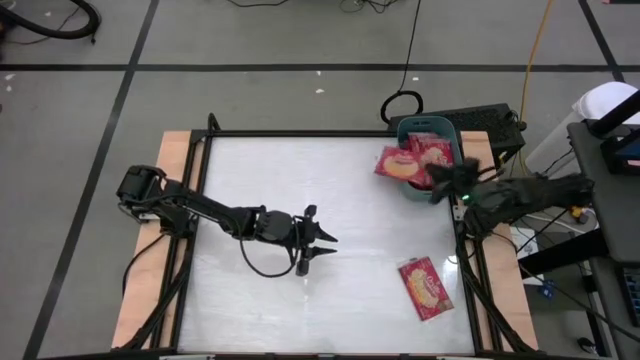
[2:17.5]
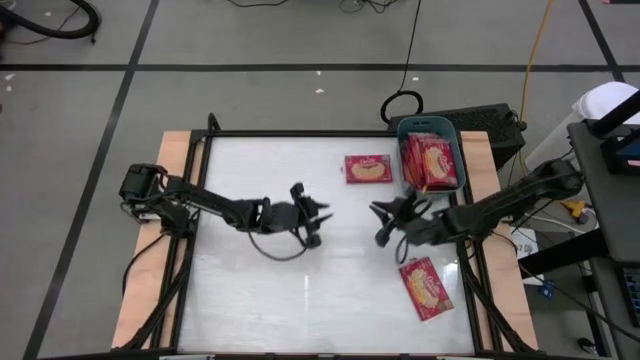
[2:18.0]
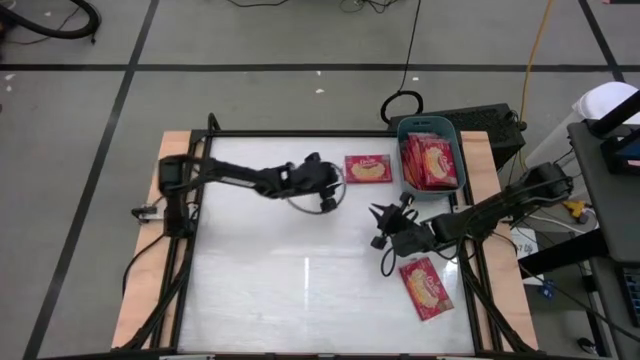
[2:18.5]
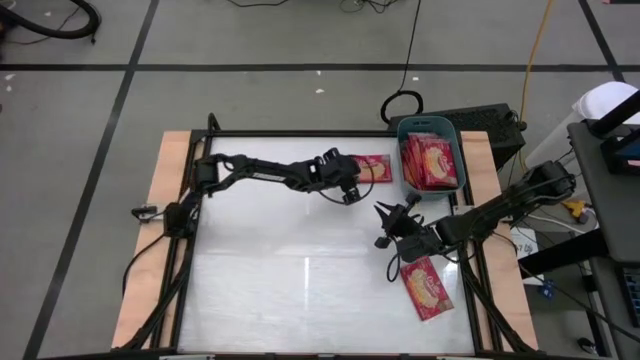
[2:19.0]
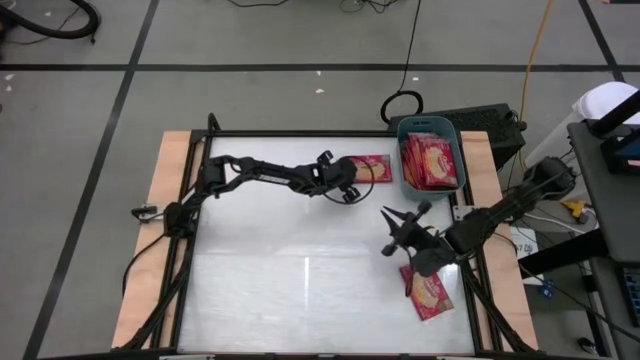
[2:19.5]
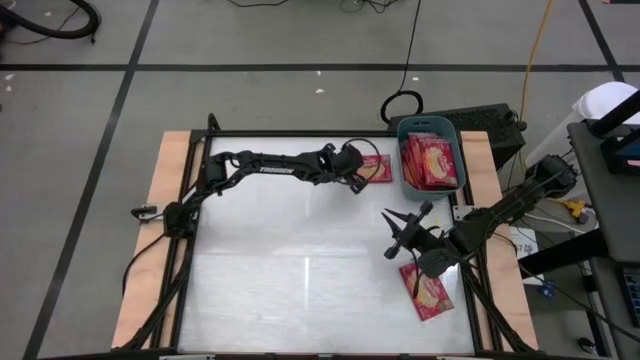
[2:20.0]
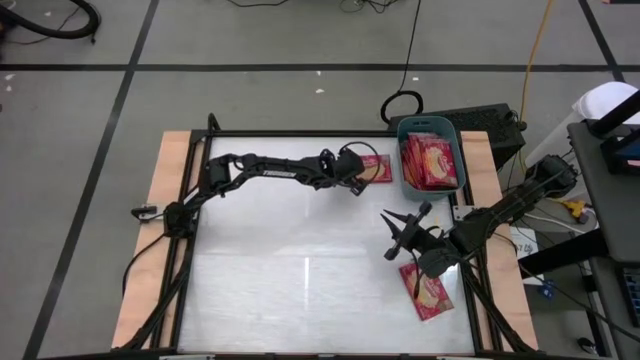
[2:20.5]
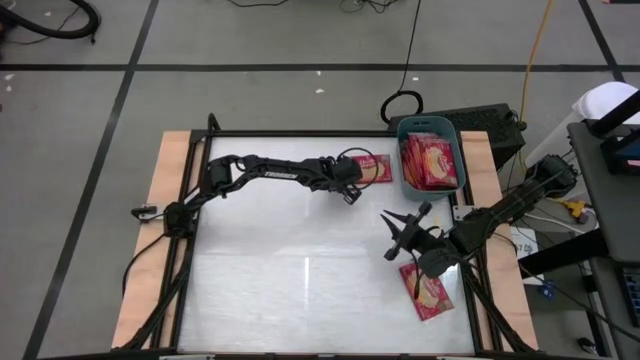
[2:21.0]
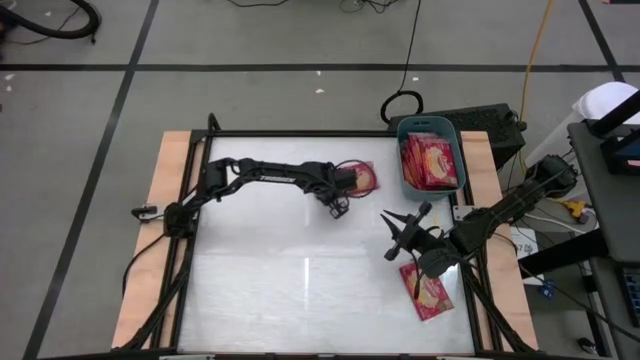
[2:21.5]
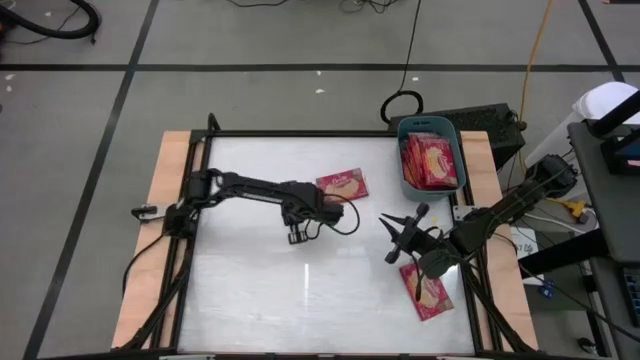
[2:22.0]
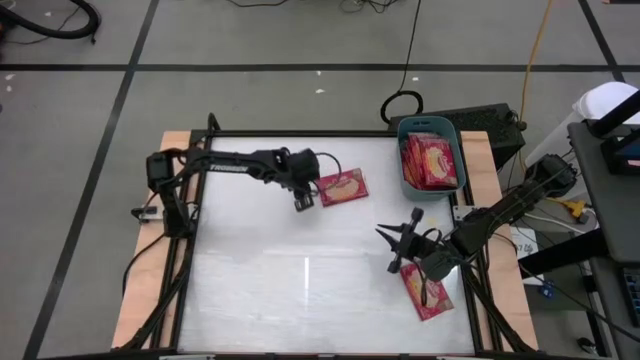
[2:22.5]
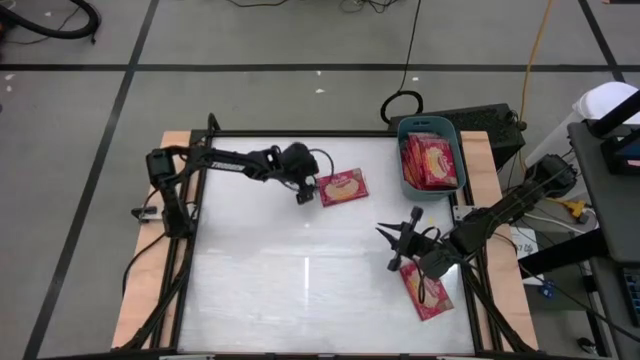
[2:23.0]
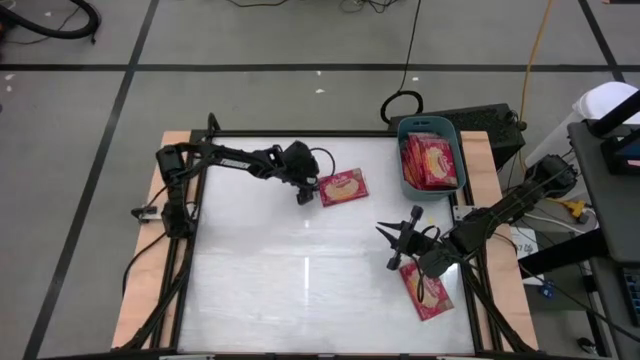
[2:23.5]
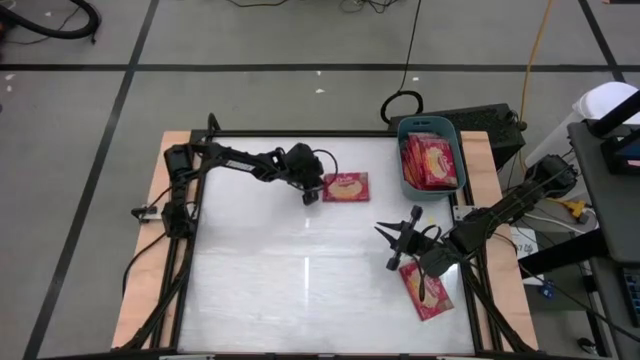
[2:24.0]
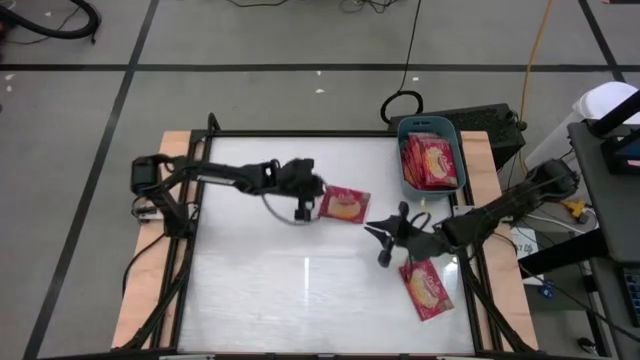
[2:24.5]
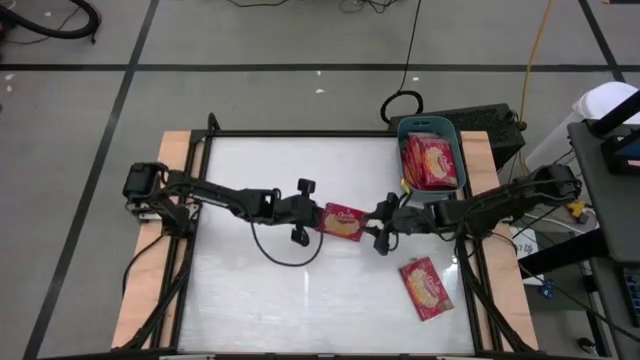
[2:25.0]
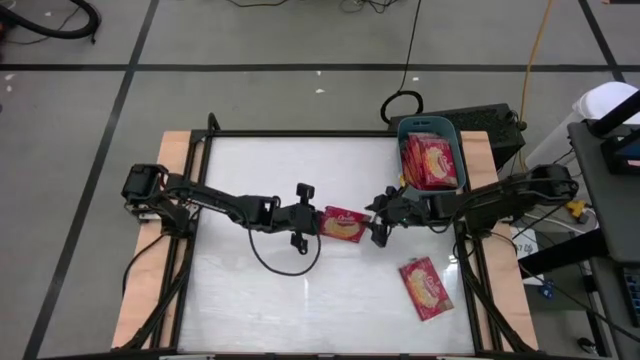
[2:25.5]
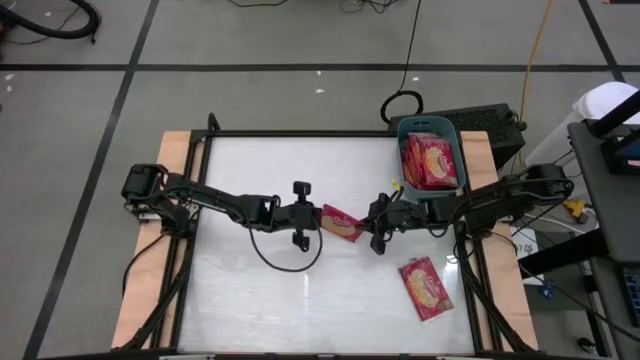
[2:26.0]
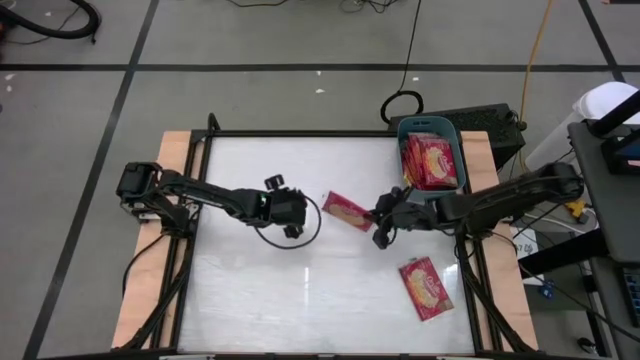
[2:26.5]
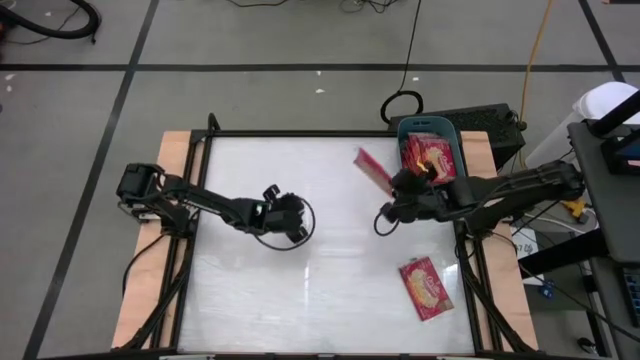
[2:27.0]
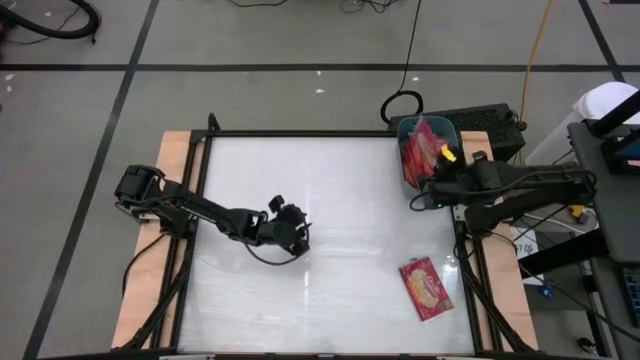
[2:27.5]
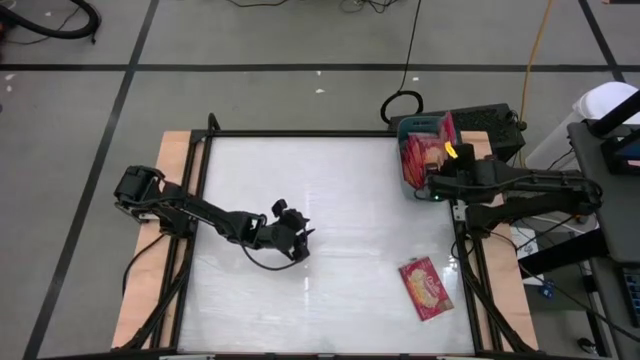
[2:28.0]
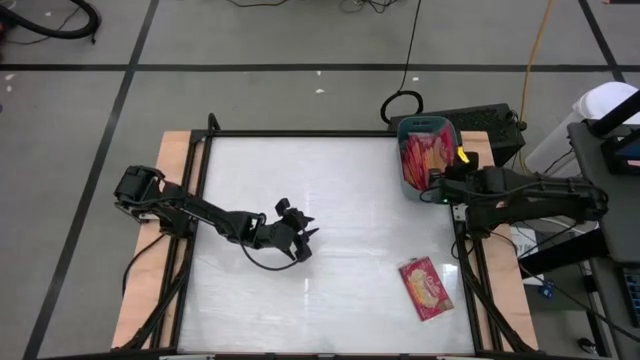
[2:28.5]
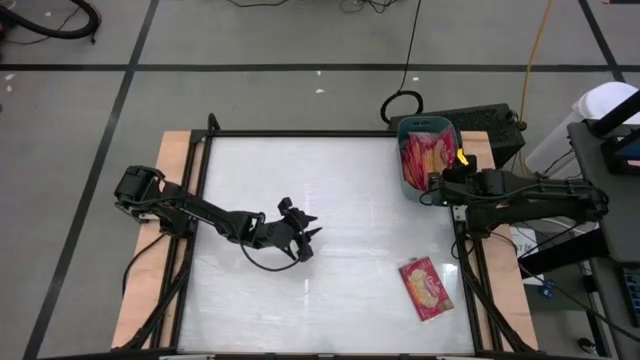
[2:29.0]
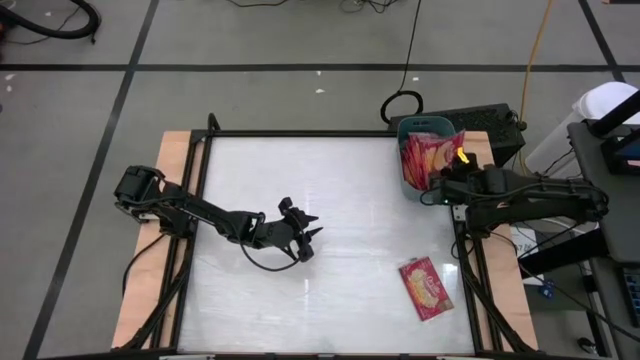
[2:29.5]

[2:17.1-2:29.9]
Task: Sort popcorn bags into baskets
Put the red popcorn bag into the blue bin

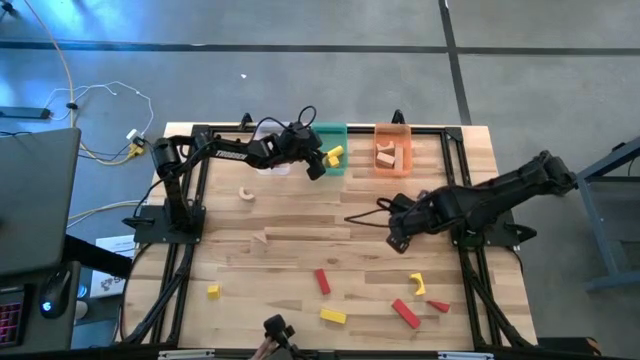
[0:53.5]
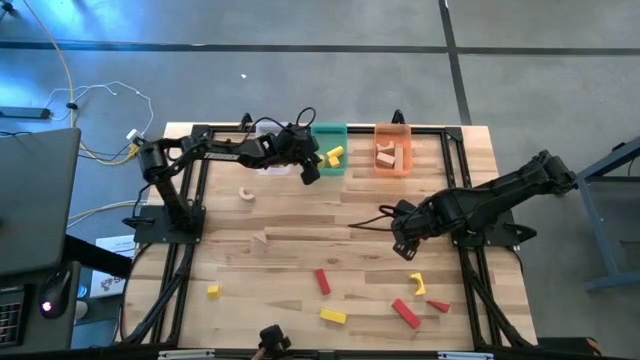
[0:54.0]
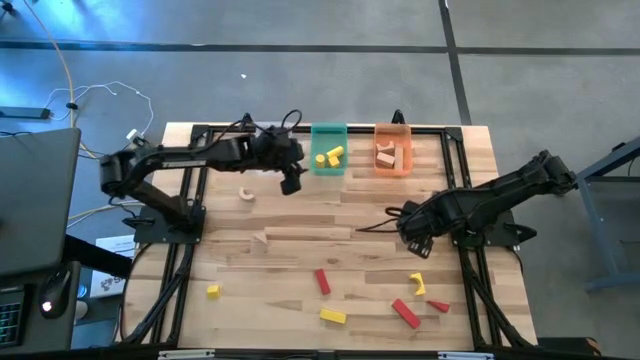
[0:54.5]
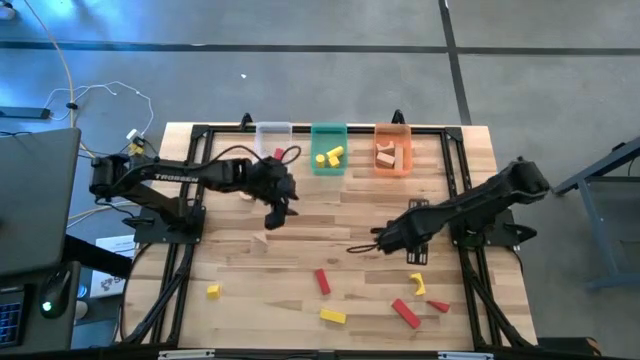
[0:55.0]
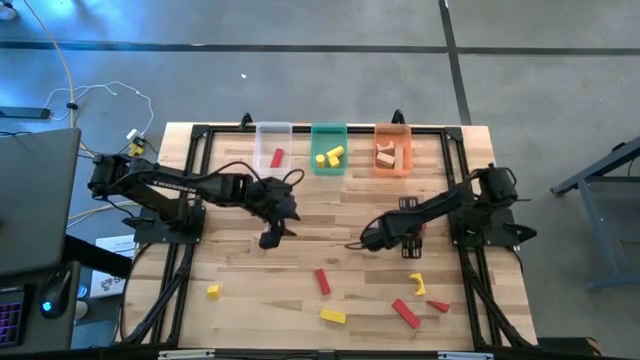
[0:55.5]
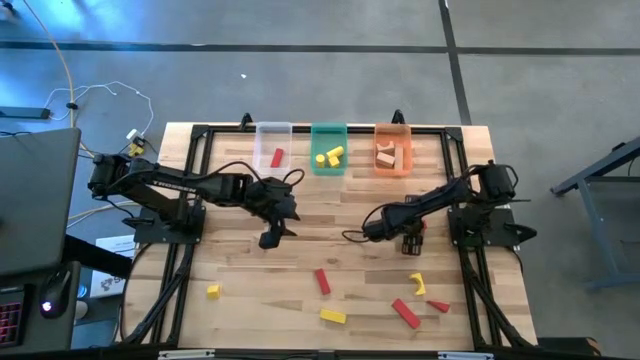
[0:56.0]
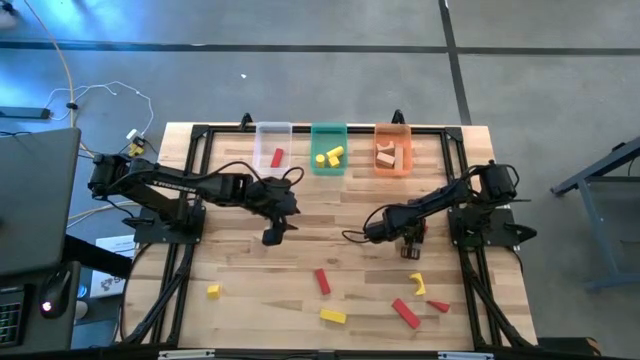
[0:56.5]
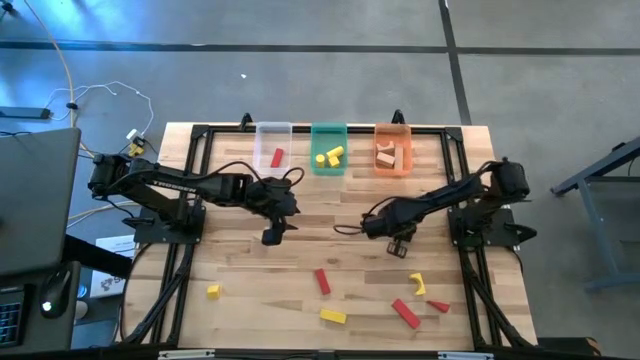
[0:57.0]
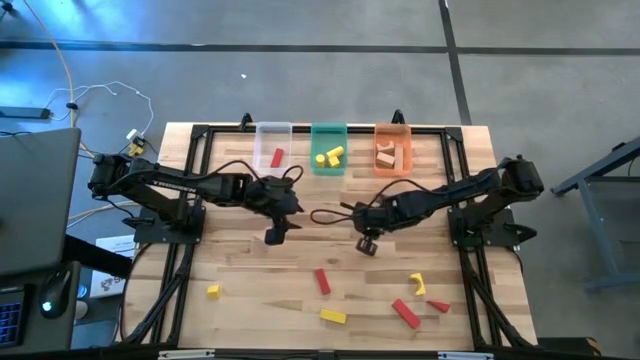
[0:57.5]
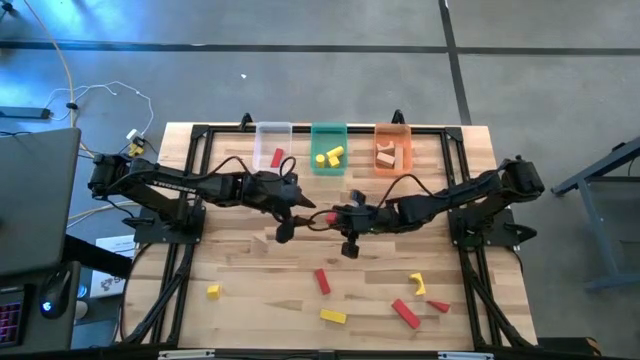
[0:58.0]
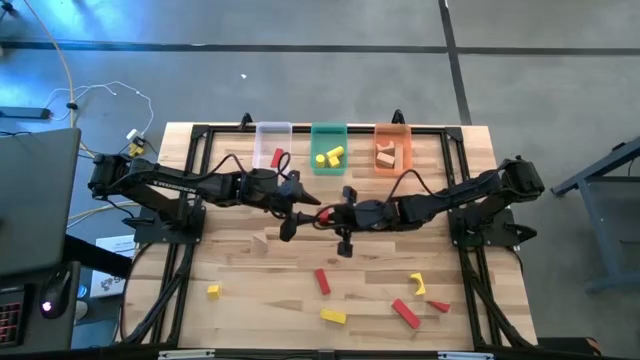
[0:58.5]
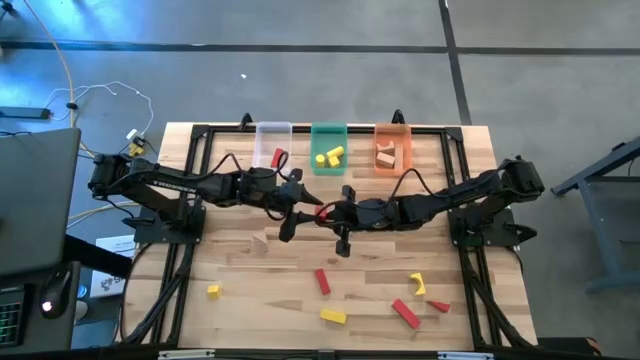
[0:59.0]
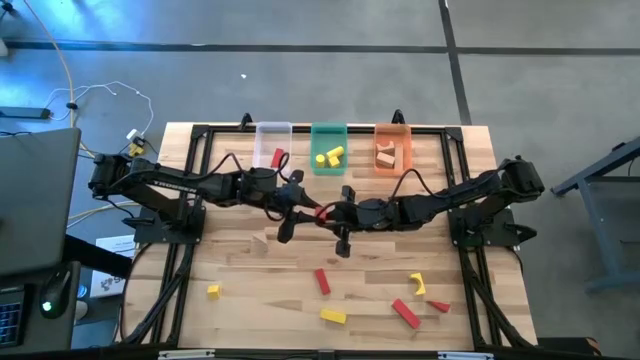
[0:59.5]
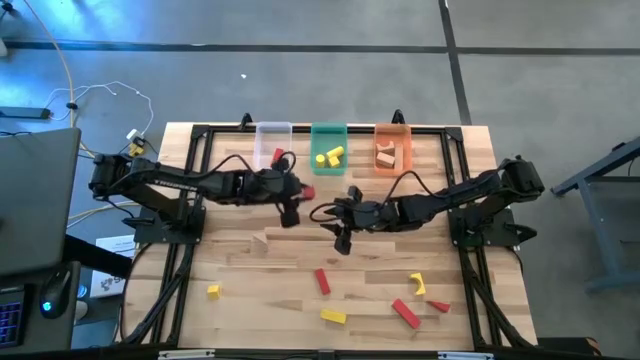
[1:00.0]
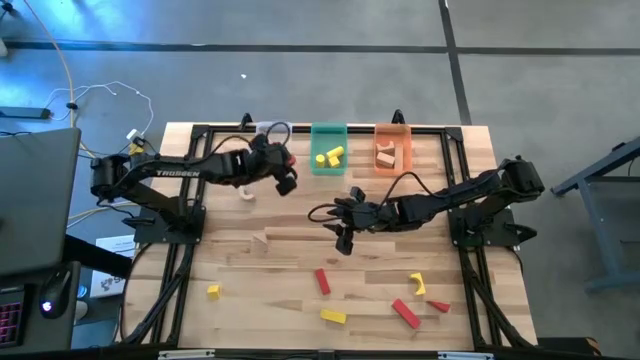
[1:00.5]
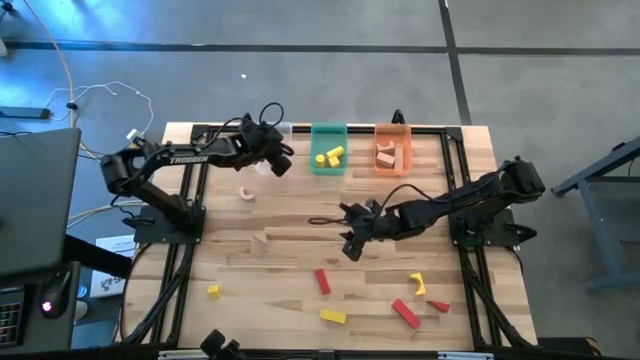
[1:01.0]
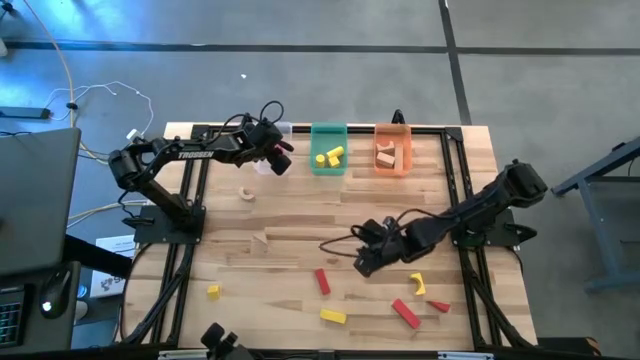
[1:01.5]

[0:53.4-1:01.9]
Task: Sort & place blocks by color
Put the red block into the white bin
